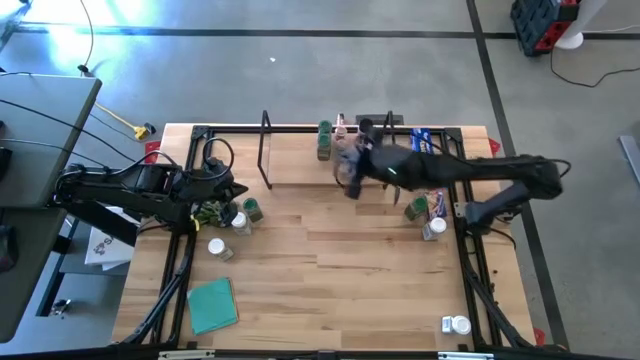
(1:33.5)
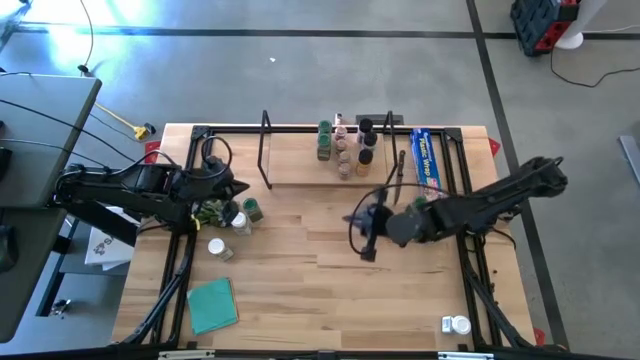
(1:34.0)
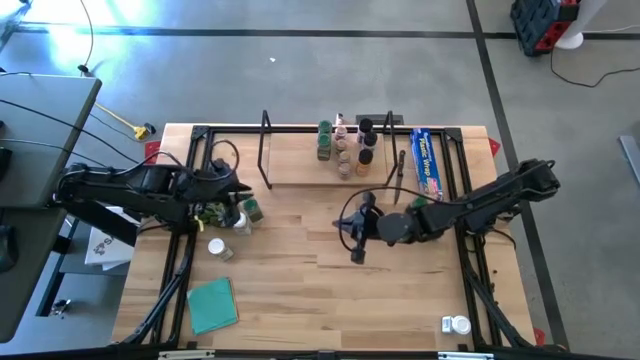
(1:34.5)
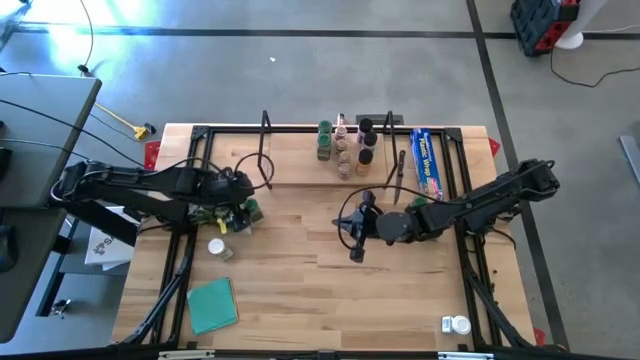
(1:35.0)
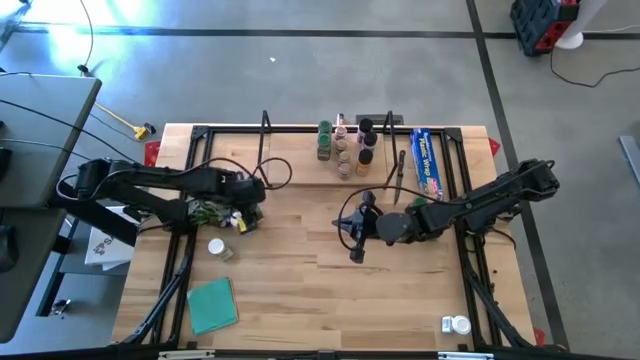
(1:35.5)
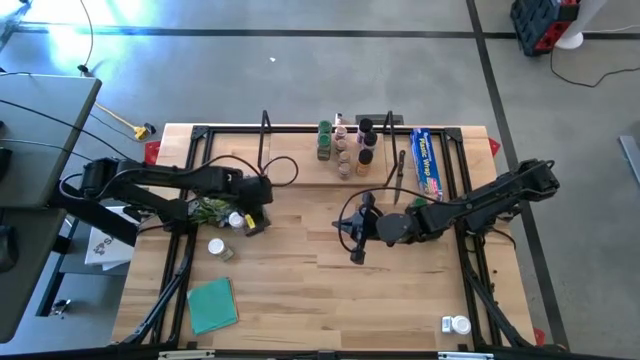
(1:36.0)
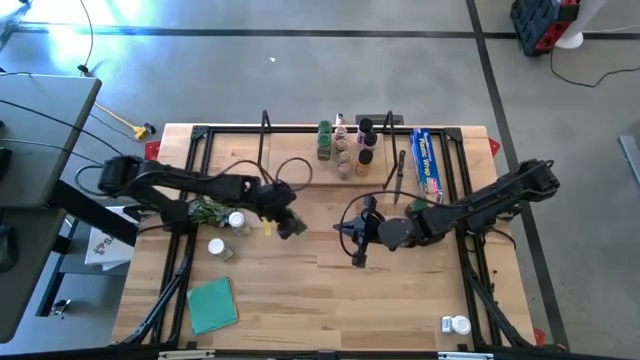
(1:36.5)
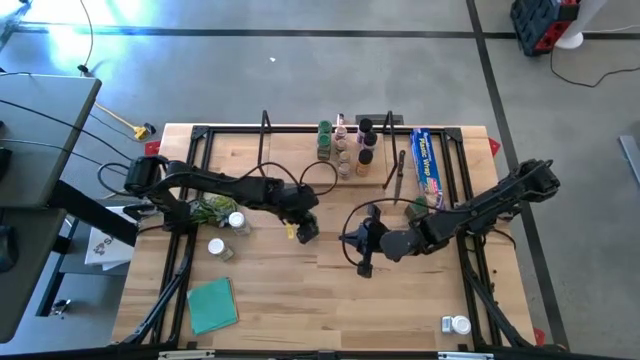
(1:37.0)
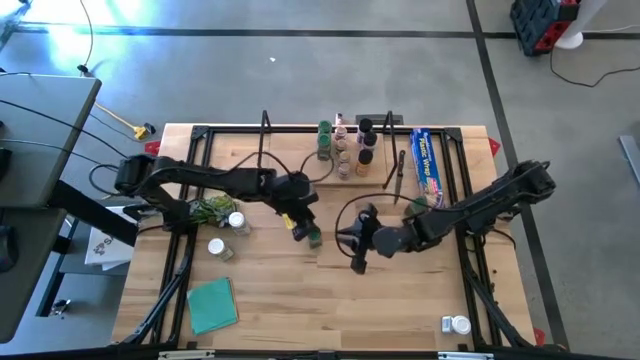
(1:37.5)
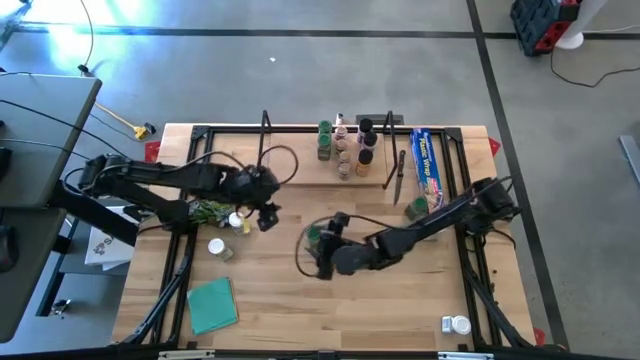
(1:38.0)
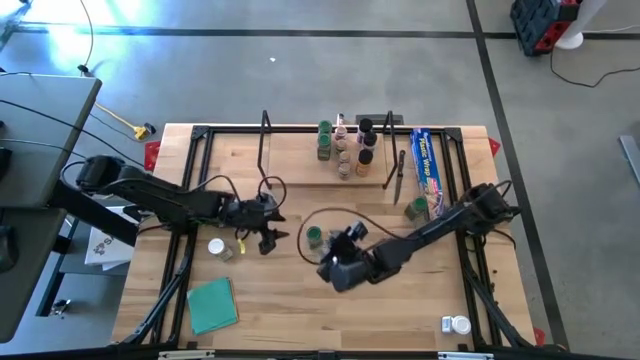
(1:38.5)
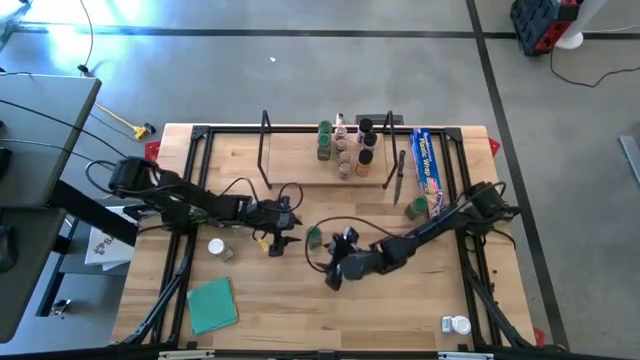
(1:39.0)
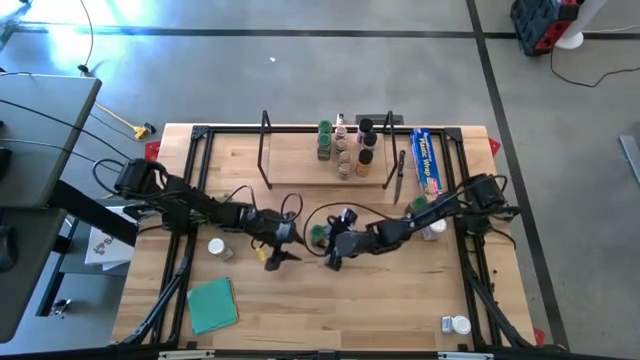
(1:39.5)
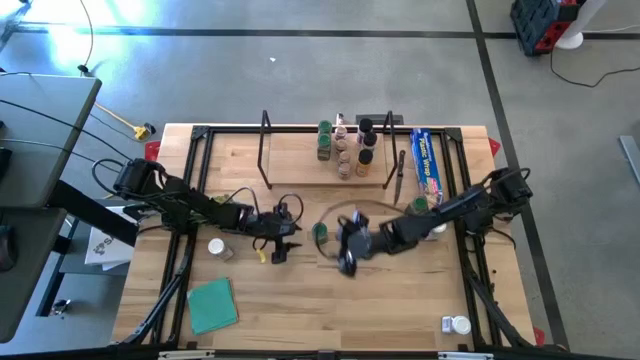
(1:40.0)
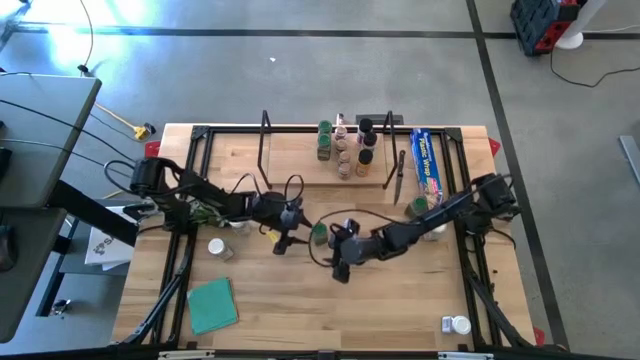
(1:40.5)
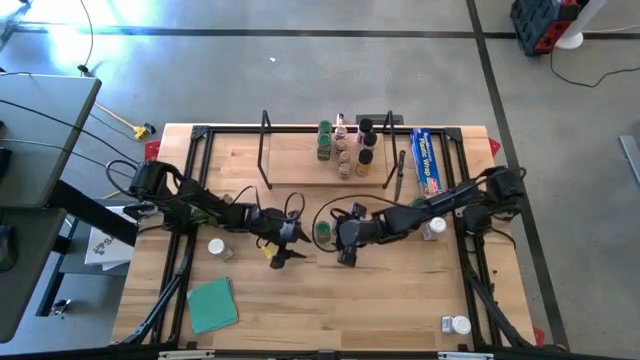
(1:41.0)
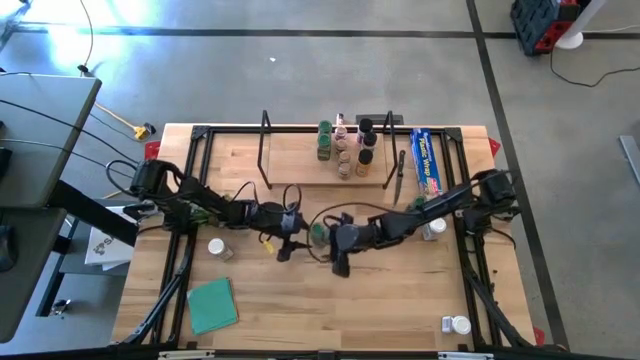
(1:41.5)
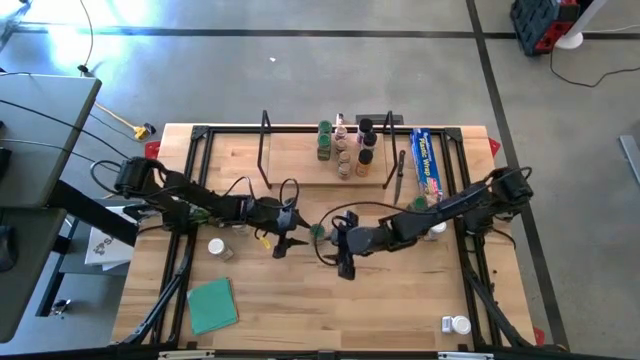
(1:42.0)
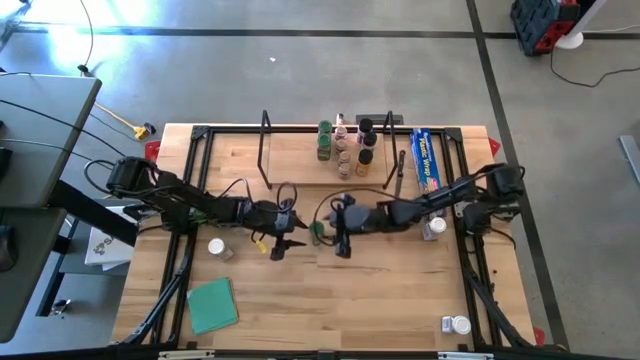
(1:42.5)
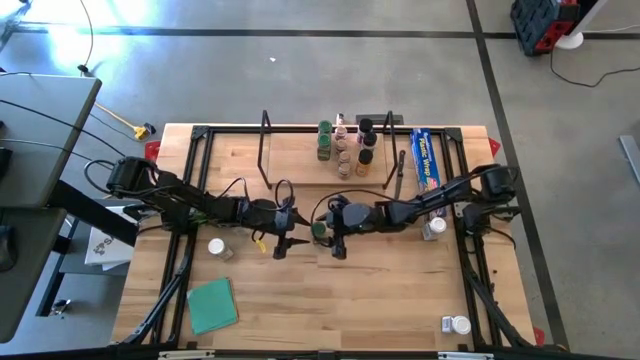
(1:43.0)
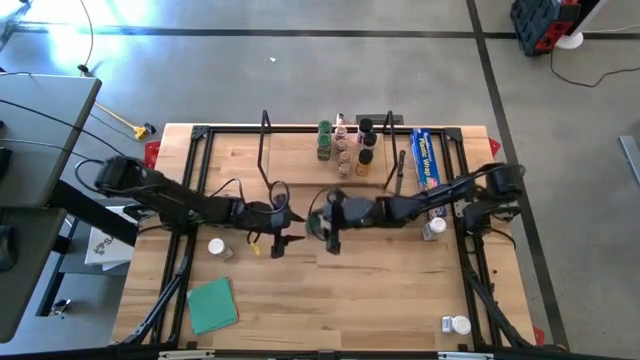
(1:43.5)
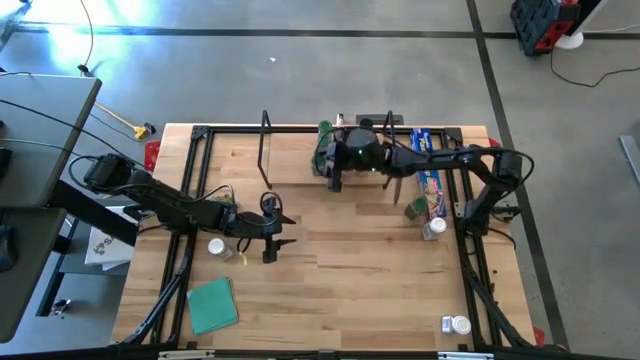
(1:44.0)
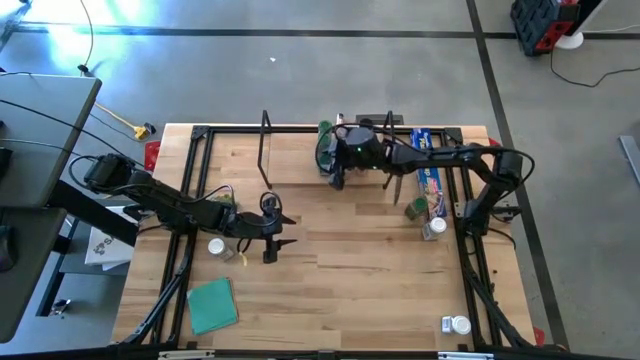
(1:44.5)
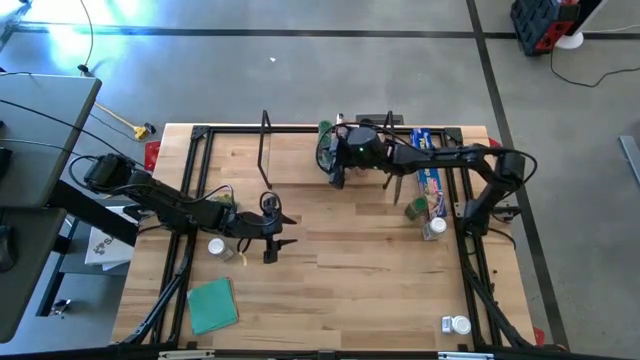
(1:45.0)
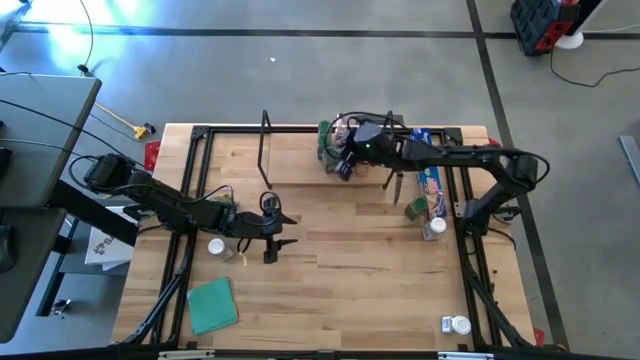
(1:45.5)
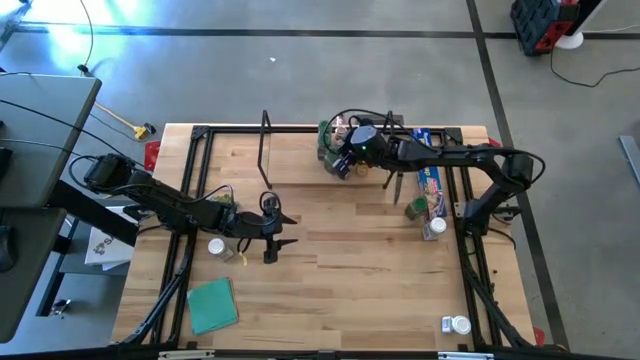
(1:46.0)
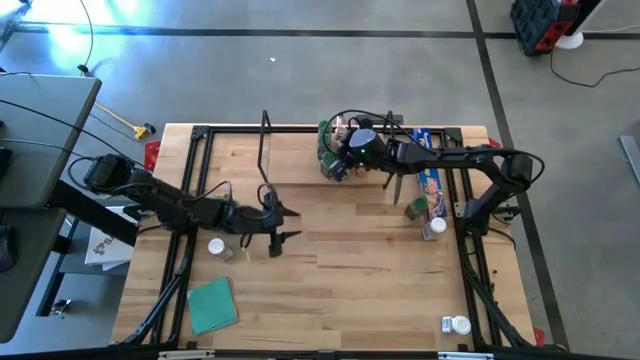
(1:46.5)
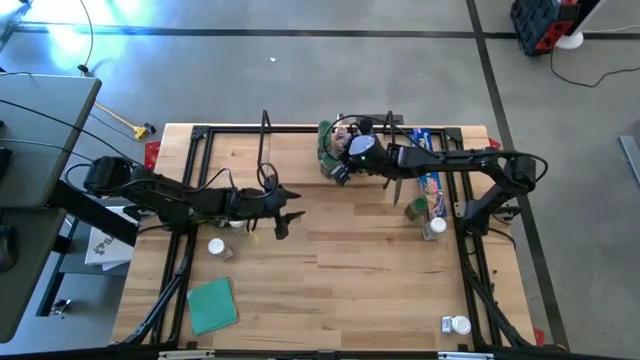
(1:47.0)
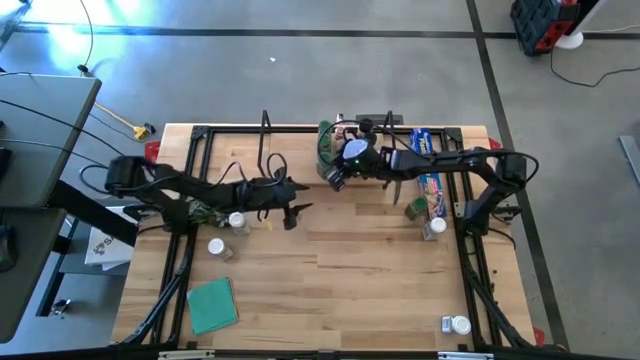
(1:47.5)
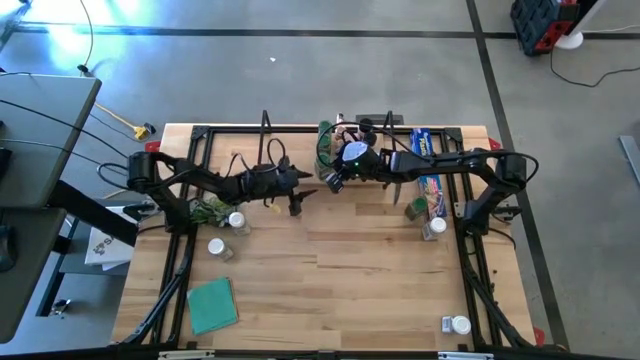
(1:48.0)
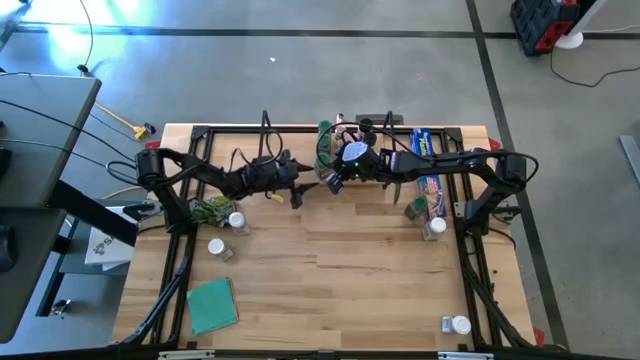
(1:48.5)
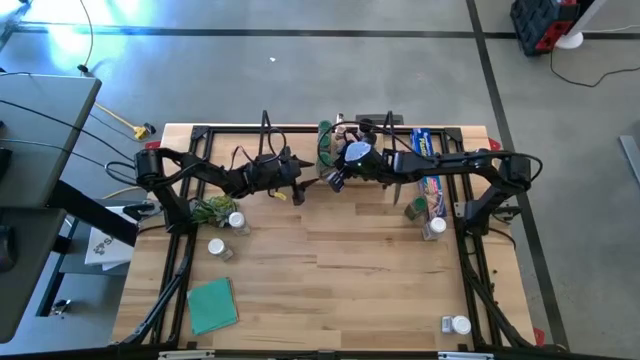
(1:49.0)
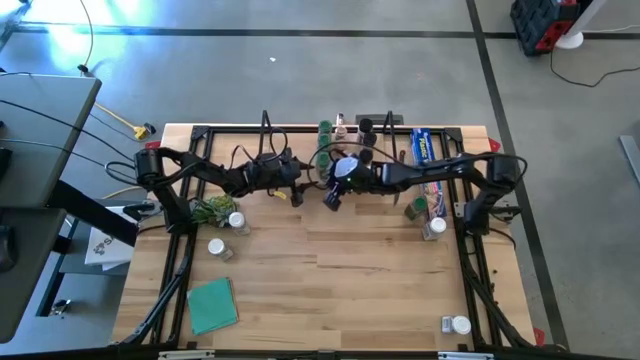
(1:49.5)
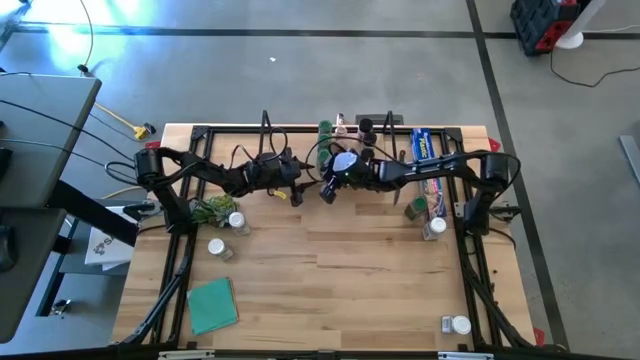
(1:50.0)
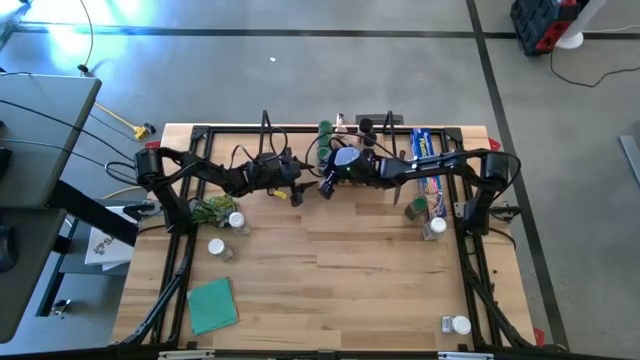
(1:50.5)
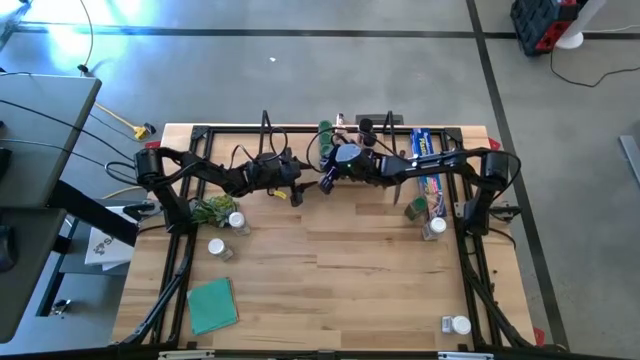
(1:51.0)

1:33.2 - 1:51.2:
Task: Shelf spices
Put the green seasoning bottle on the shelf align with the other green seasoning bottle

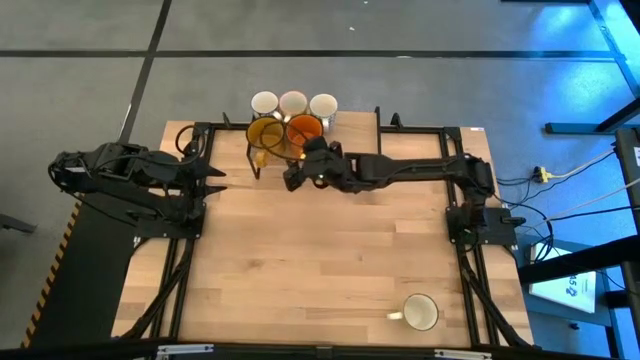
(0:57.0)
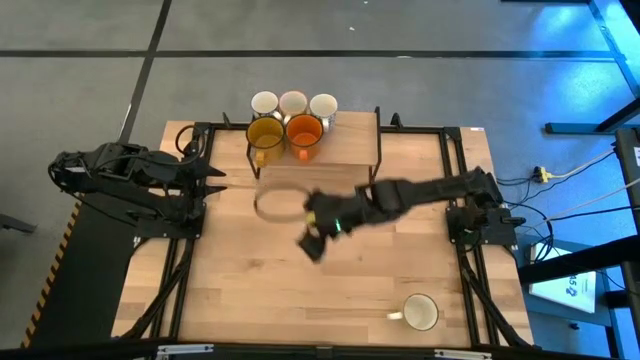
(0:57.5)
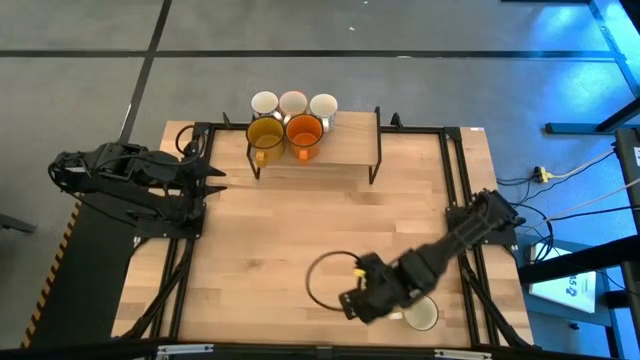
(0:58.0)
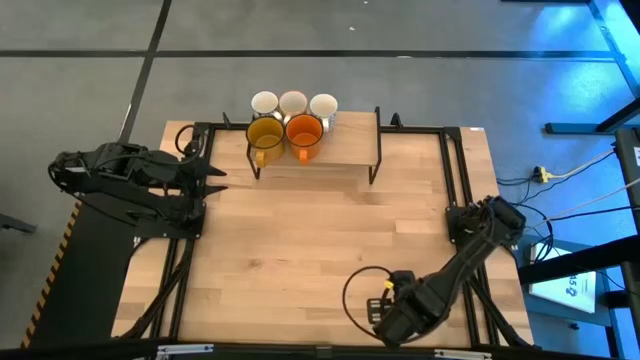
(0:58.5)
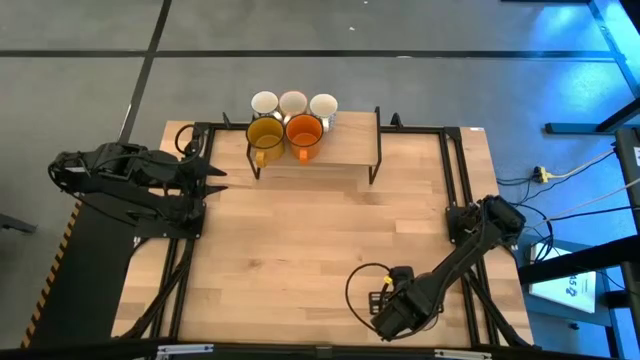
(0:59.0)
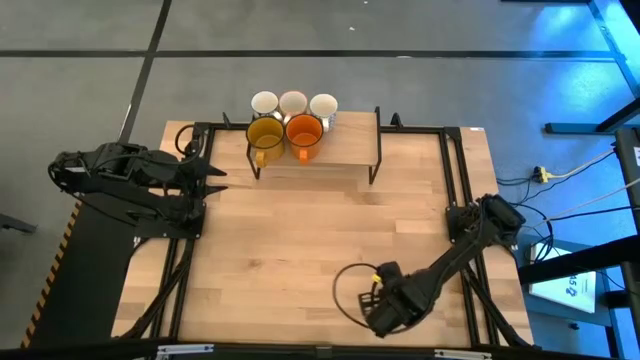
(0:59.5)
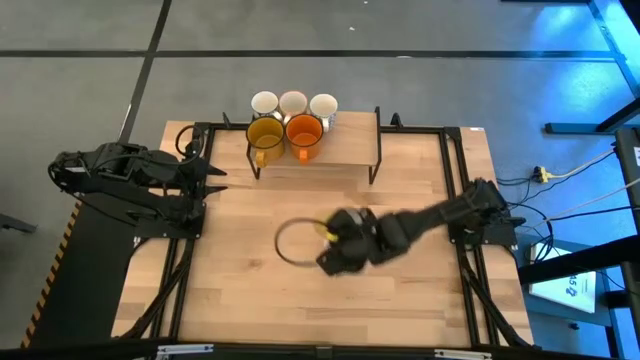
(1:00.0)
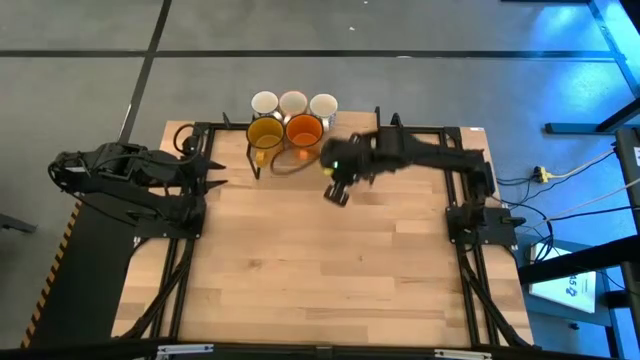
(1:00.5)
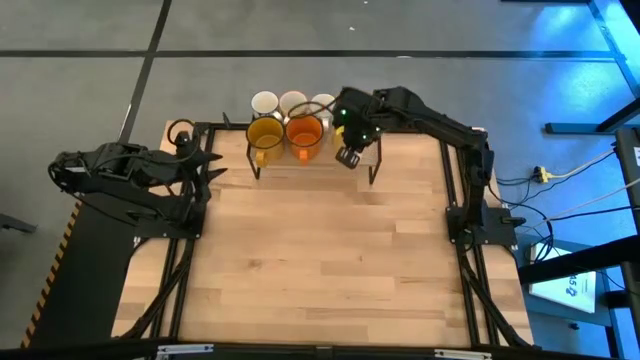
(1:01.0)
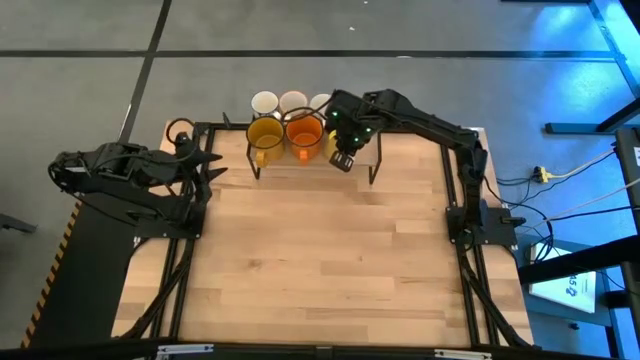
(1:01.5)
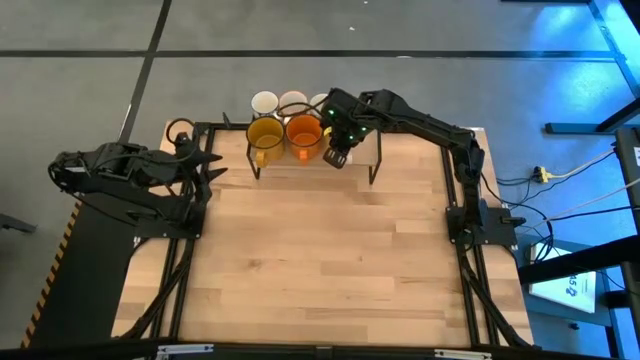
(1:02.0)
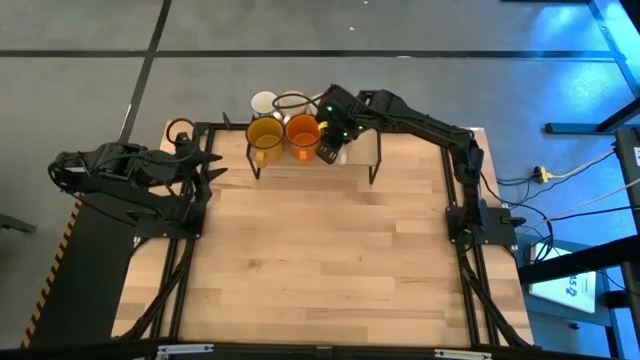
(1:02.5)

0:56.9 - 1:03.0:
Task: Place coffee mugs
Put the light yellow mug on the shelf
